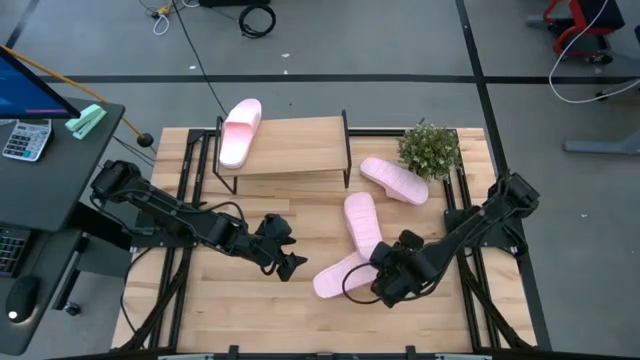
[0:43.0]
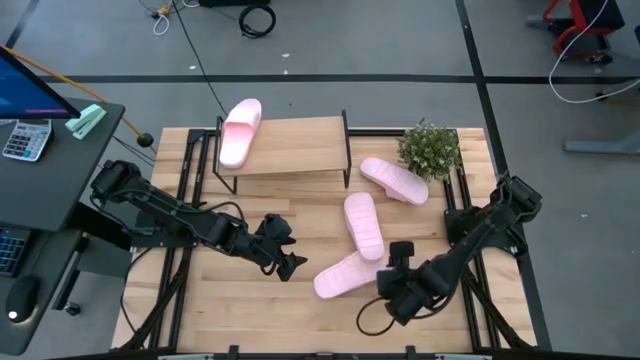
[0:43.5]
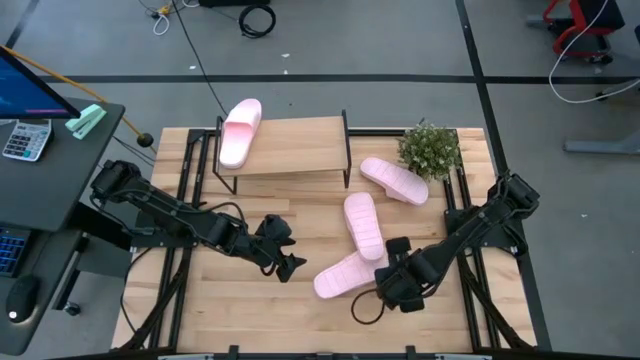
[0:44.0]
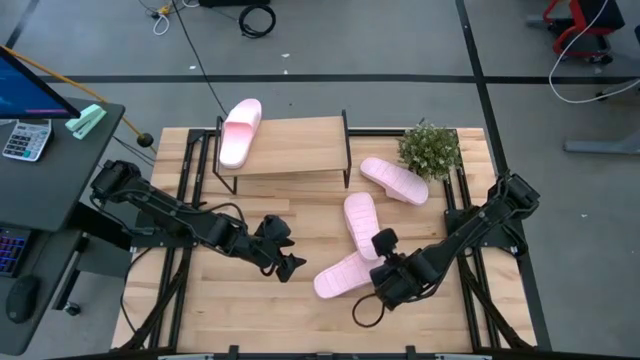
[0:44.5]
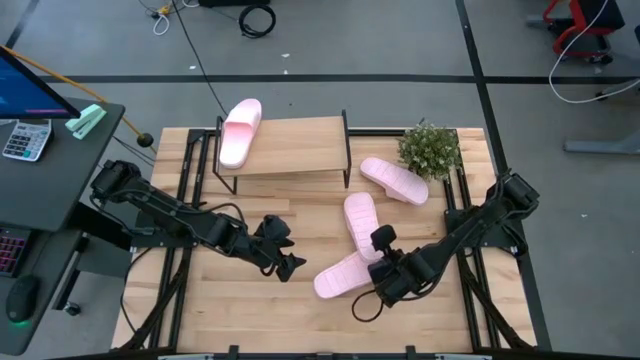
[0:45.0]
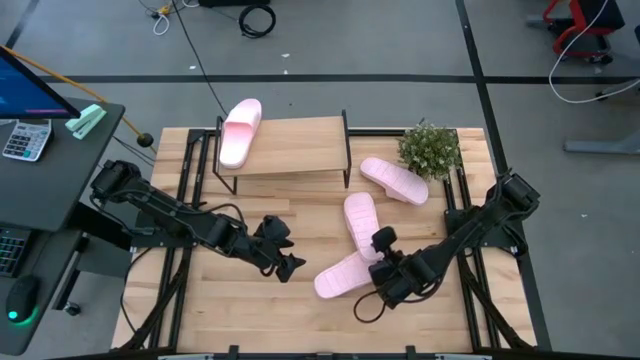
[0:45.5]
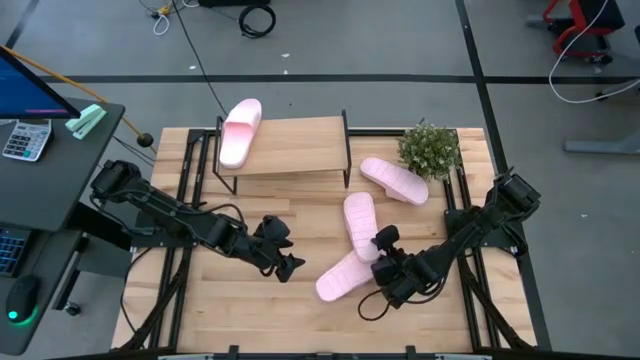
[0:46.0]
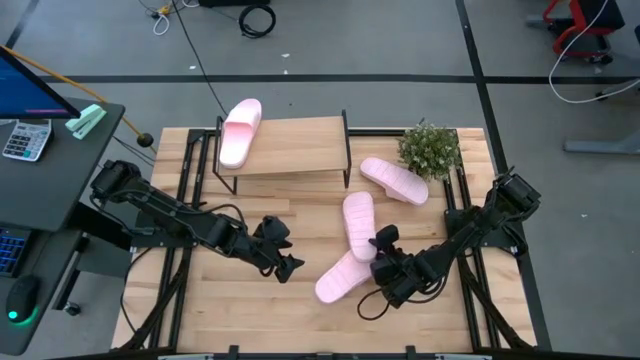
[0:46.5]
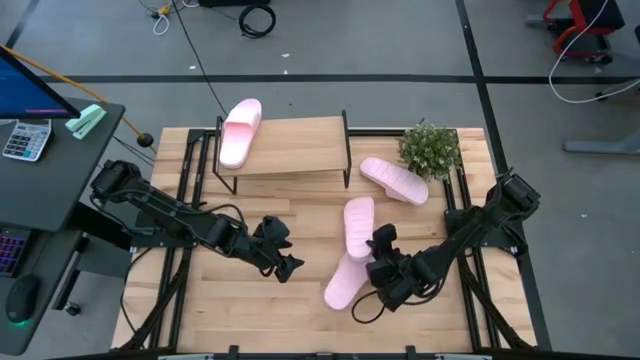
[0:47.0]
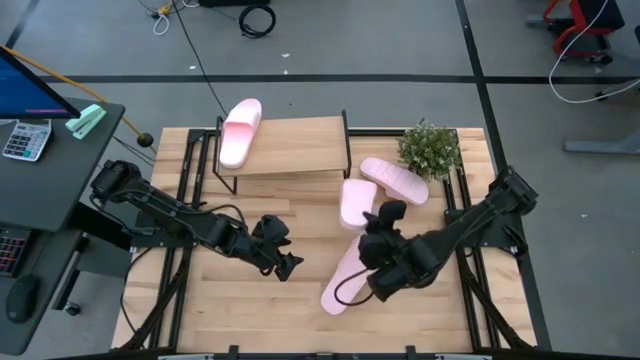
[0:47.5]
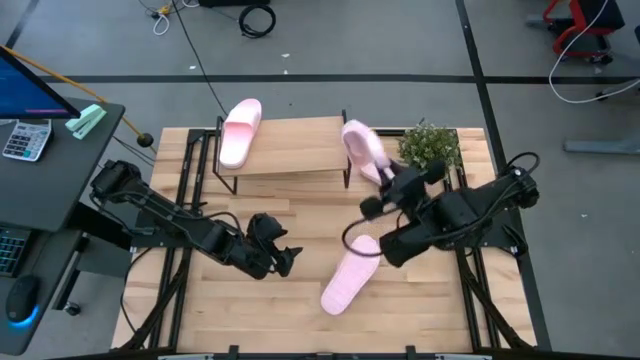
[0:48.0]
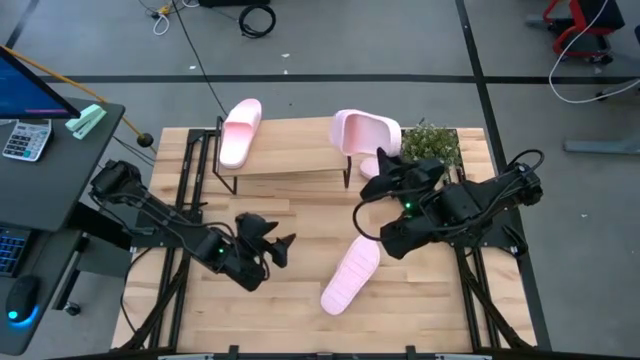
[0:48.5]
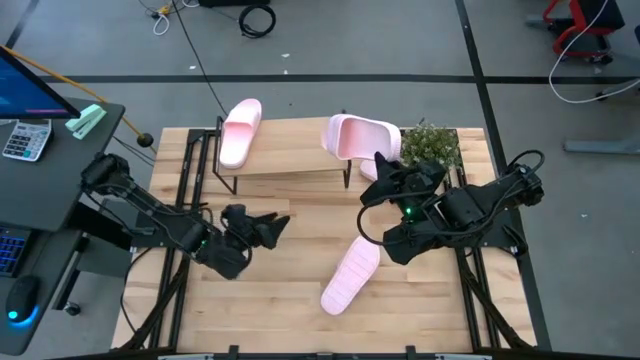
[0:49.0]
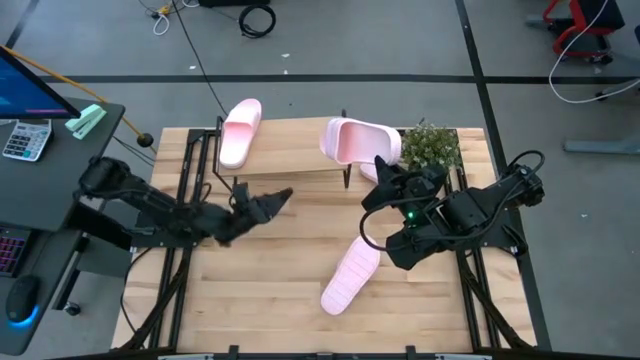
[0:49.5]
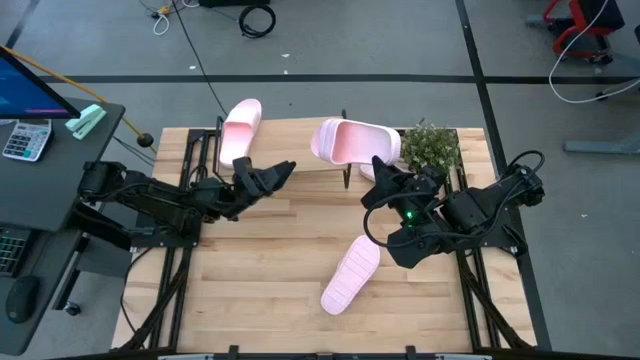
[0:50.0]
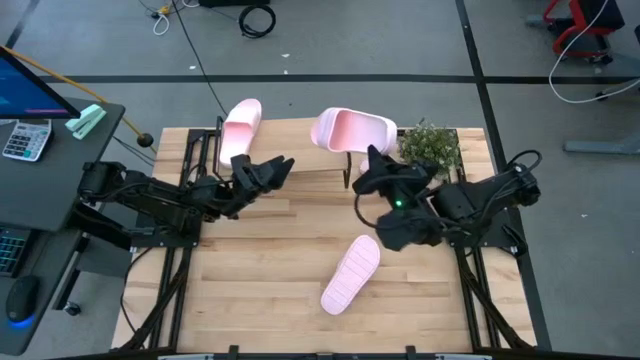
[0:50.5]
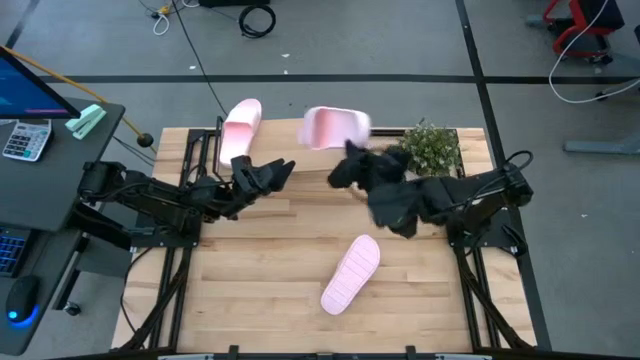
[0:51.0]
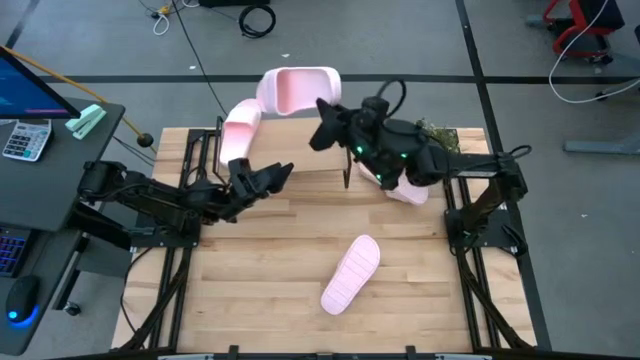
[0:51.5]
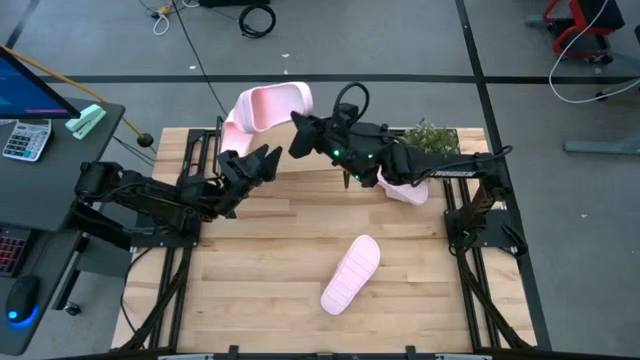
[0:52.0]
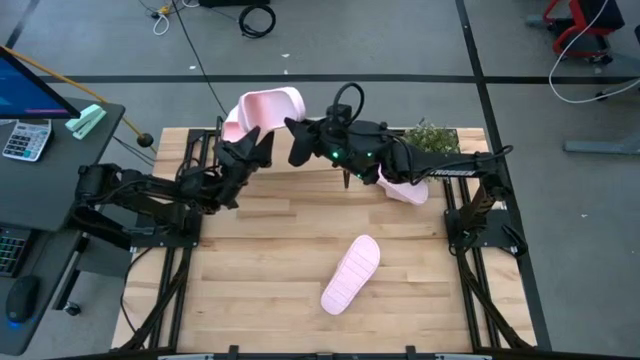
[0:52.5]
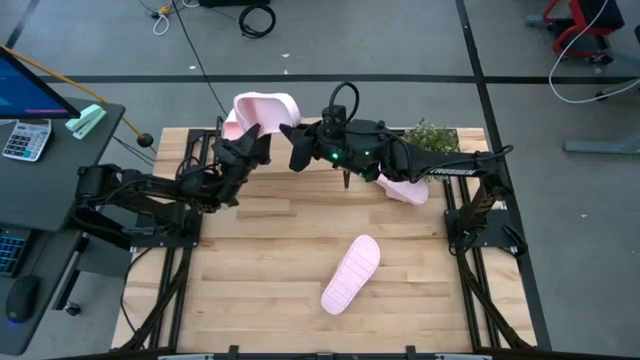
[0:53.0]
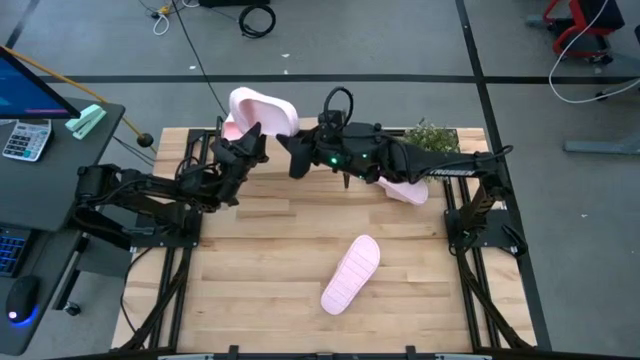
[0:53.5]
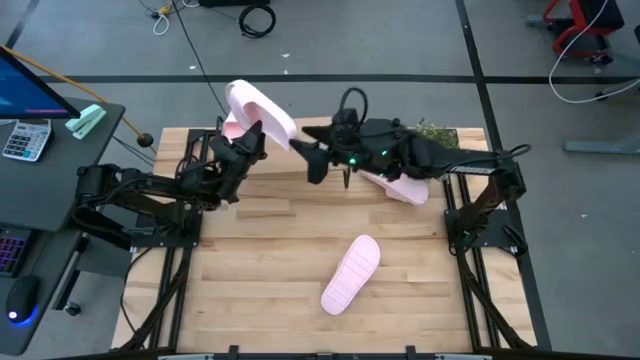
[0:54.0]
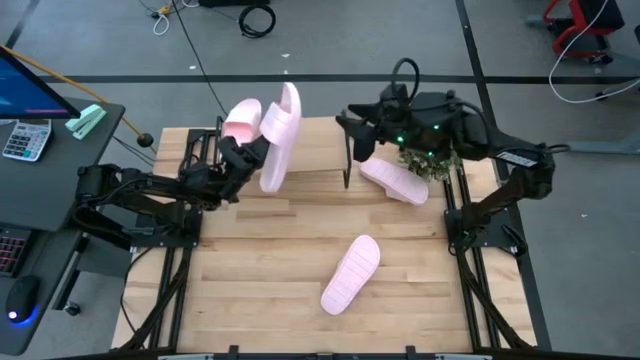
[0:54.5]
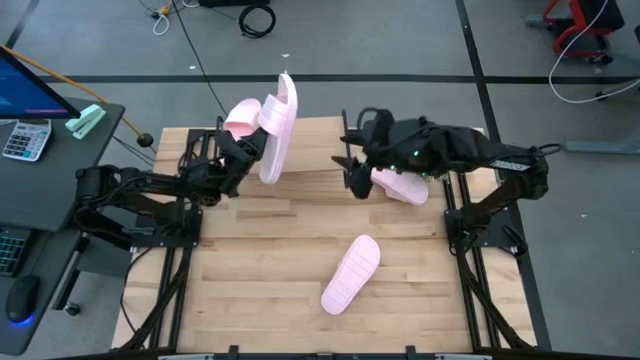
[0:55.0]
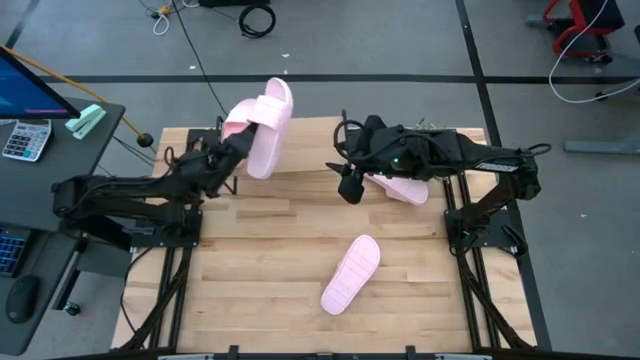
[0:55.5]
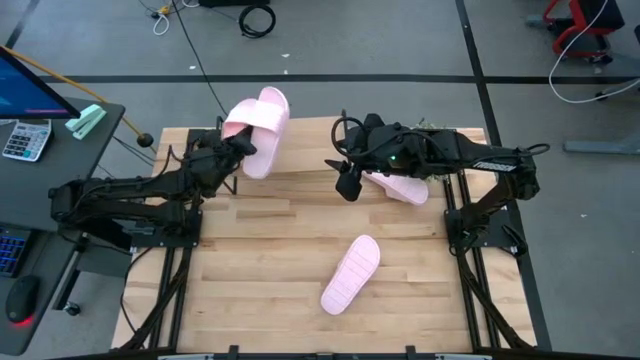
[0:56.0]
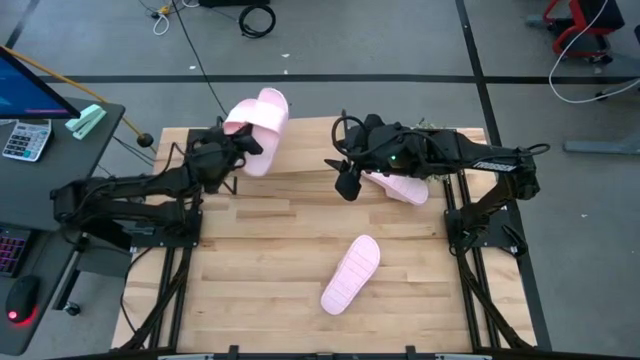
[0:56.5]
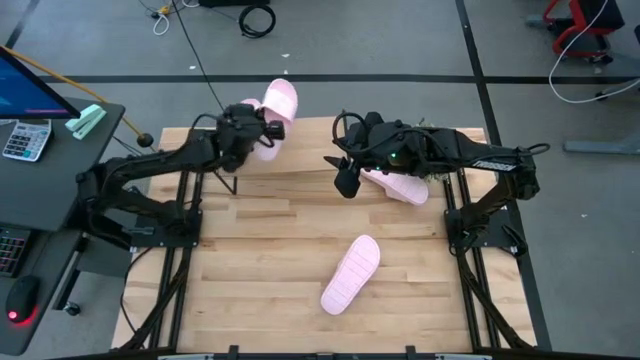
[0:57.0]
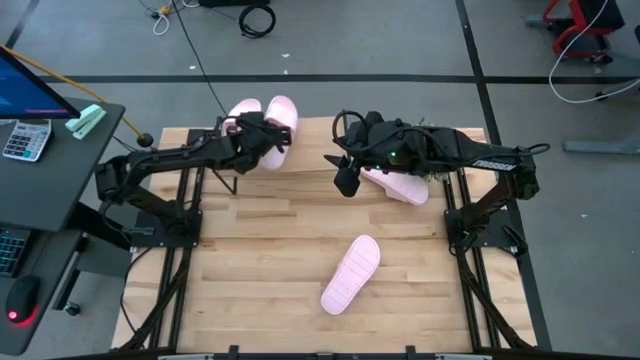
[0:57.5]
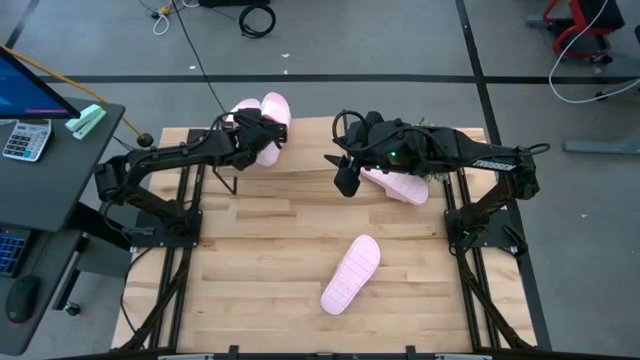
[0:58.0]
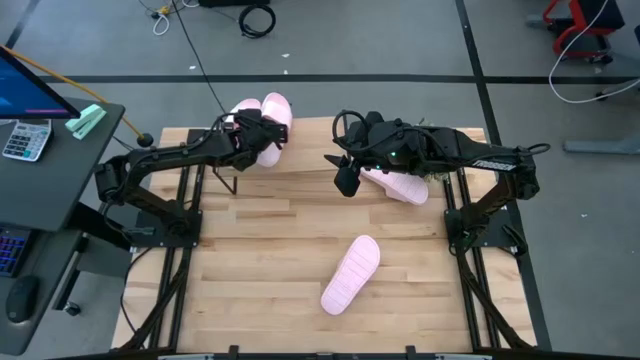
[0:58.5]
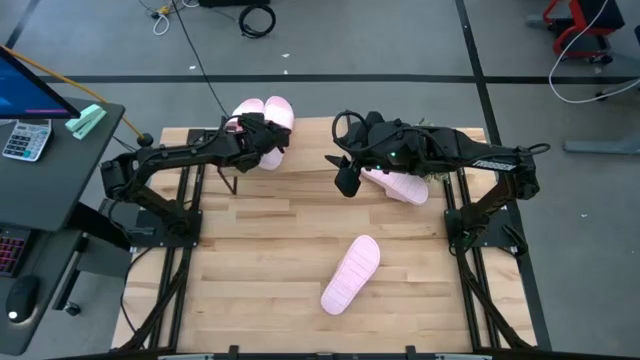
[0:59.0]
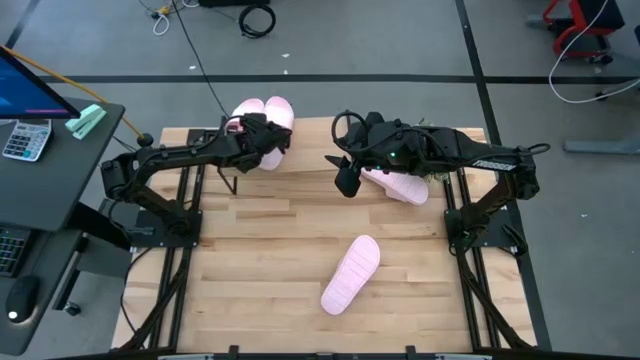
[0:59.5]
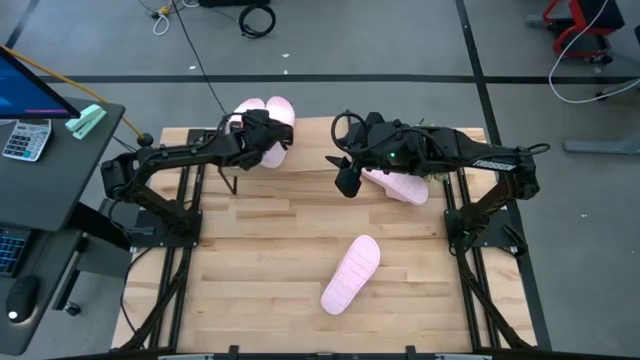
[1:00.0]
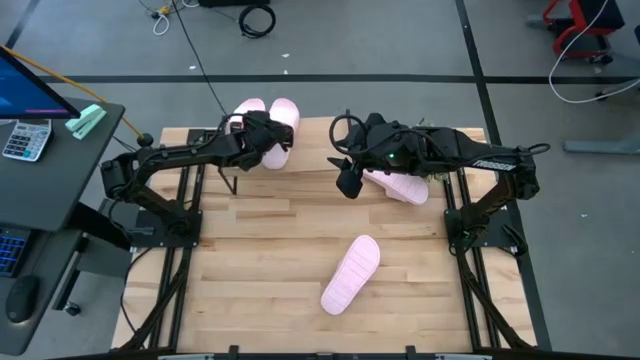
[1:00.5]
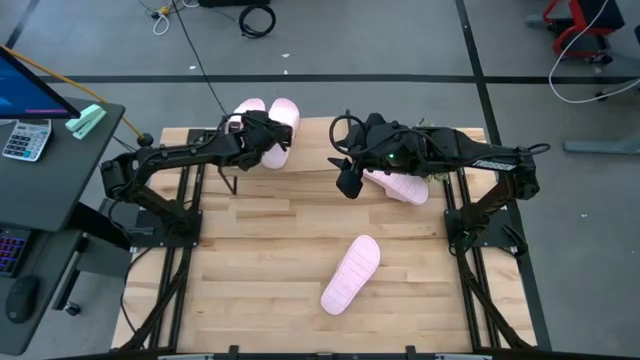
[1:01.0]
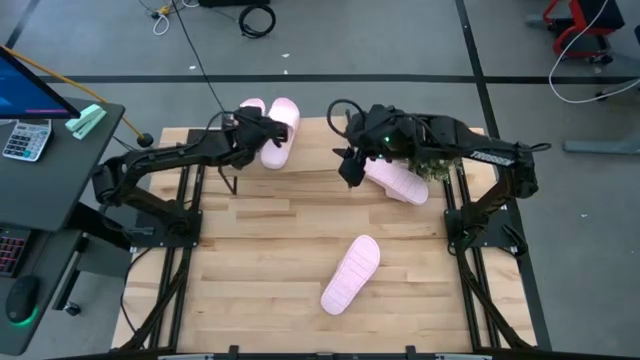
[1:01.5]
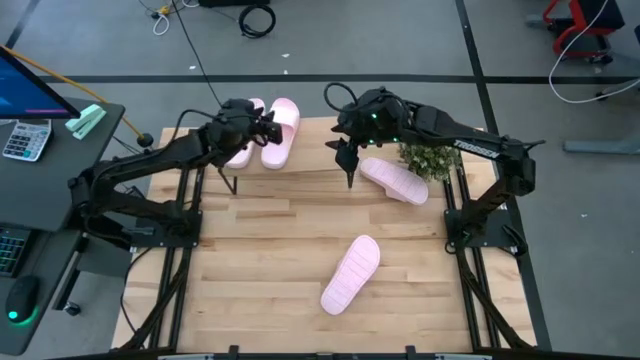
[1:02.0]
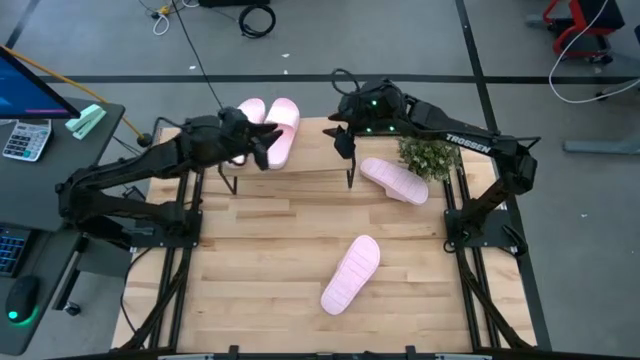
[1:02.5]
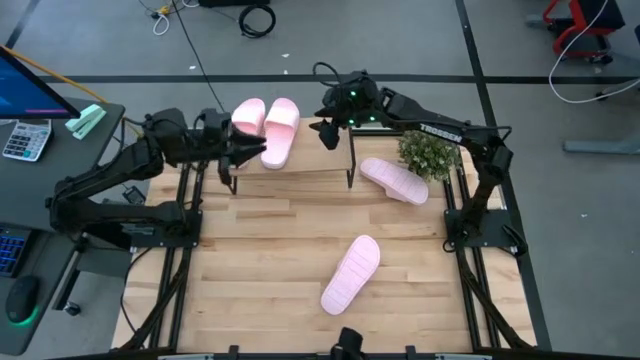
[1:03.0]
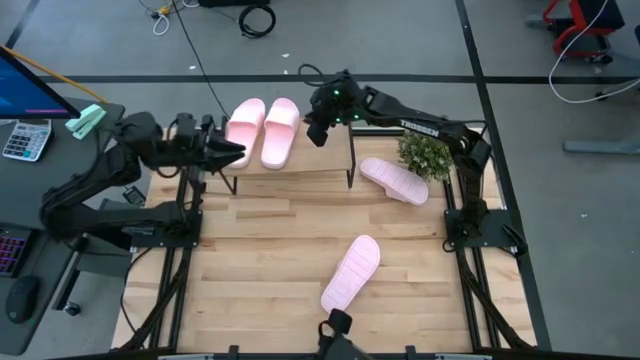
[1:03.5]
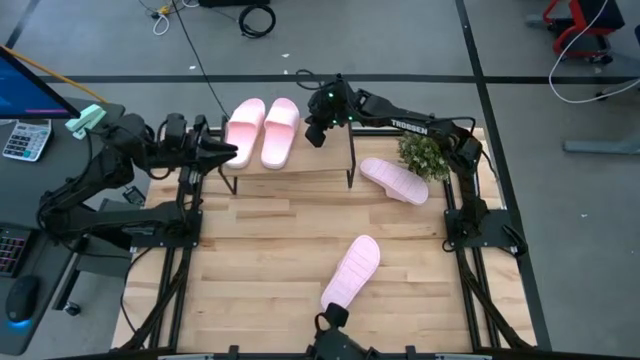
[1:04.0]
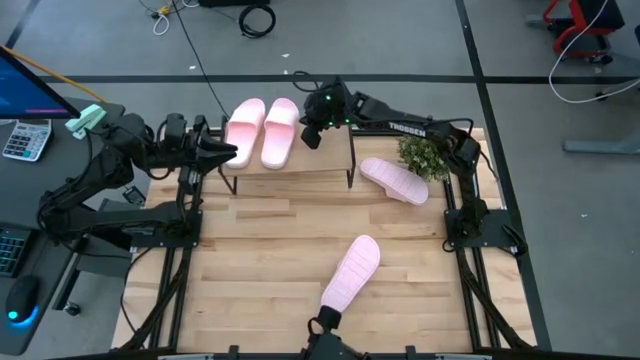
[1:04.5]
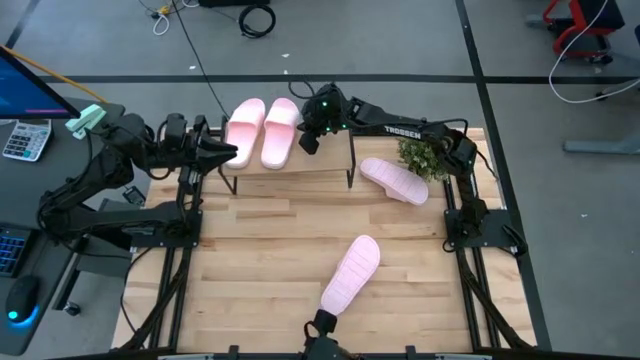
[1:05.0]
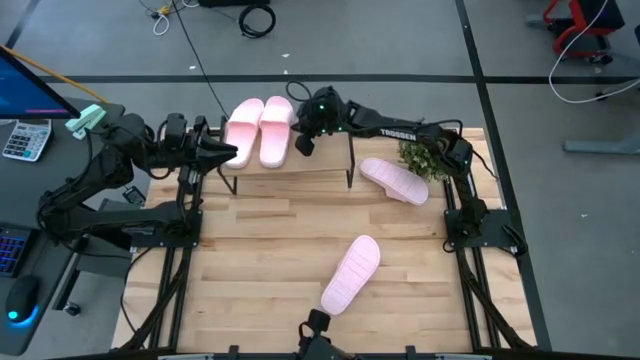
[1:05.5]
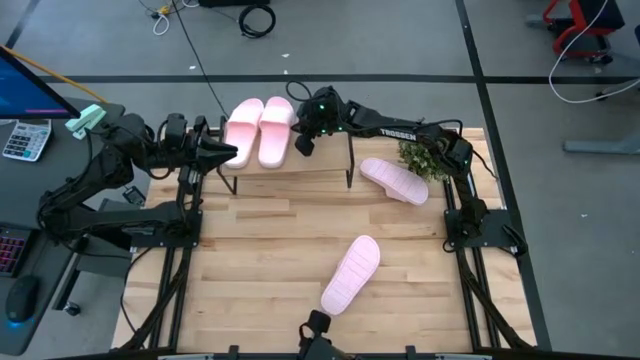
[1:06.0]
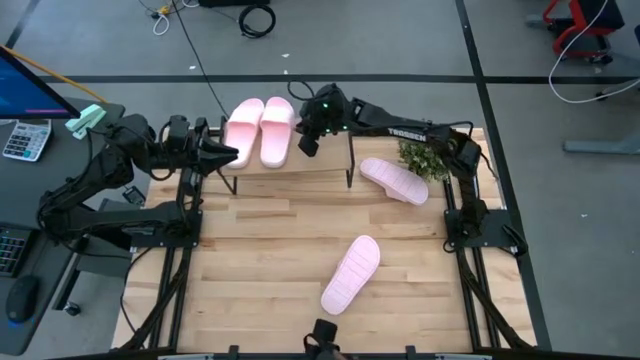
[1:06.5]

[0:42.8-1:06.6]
Task: Pick and place slides into the shelf
Put the pink slides on the shelf
